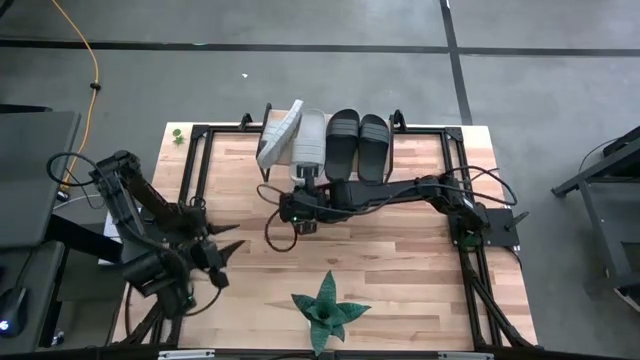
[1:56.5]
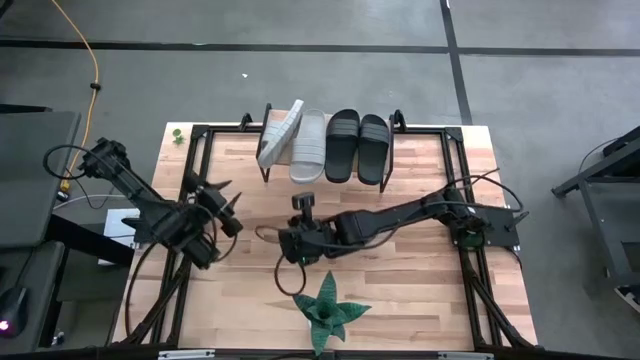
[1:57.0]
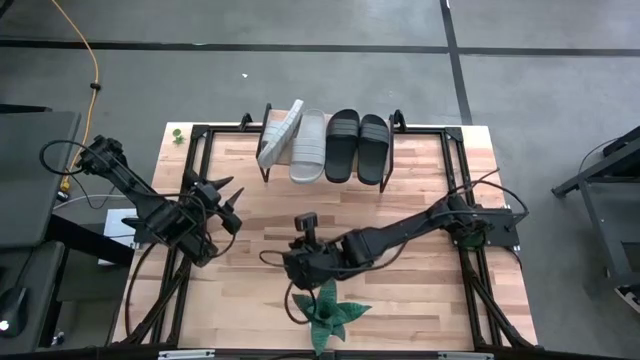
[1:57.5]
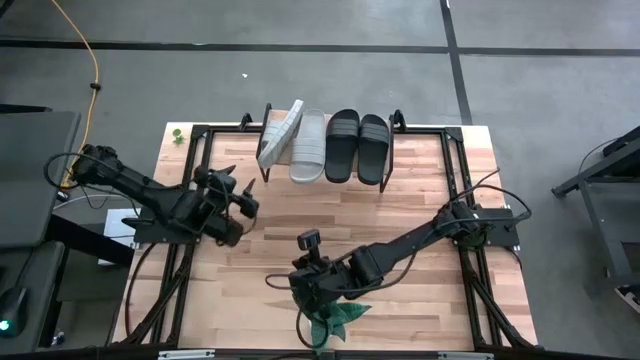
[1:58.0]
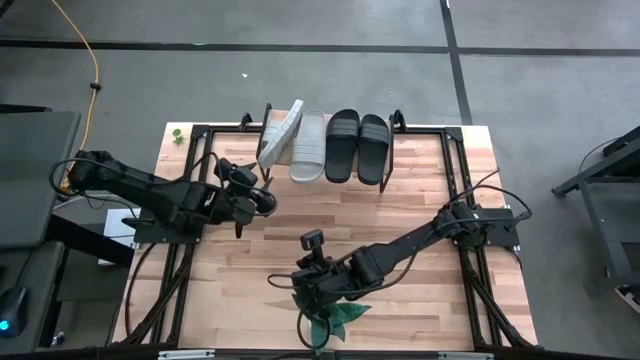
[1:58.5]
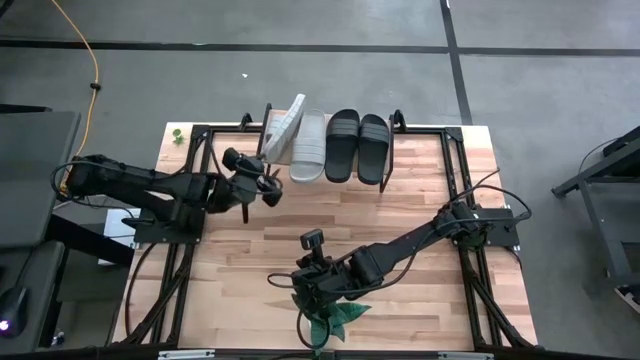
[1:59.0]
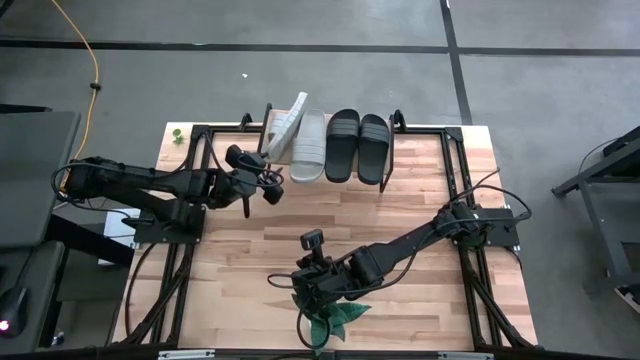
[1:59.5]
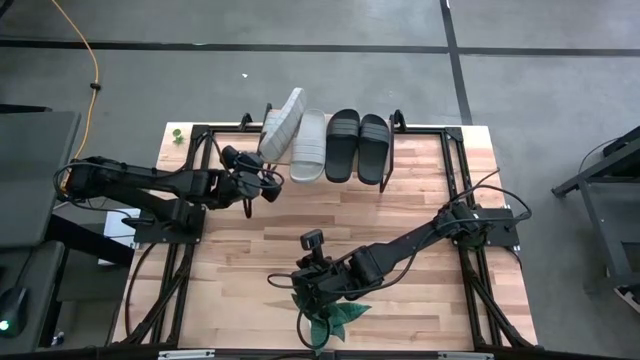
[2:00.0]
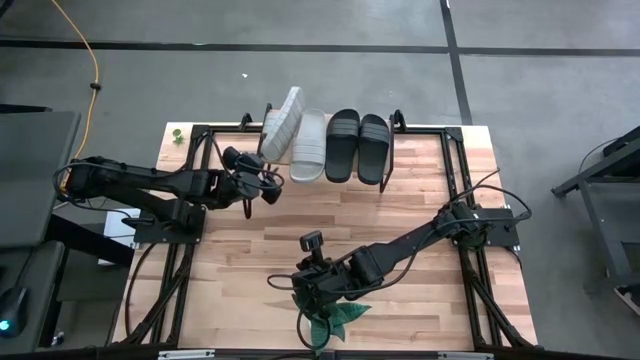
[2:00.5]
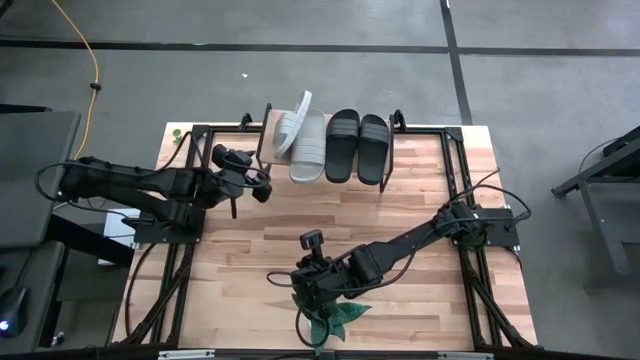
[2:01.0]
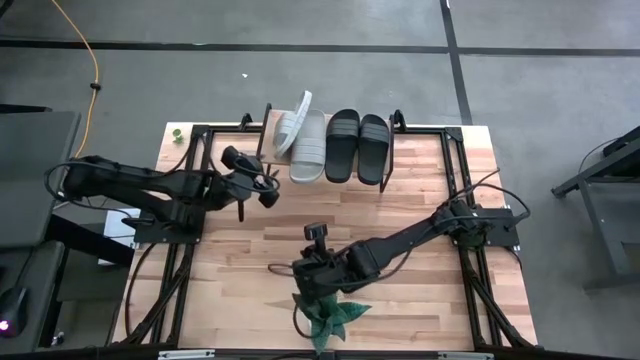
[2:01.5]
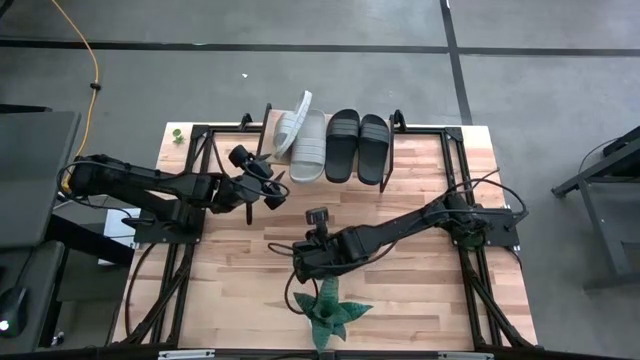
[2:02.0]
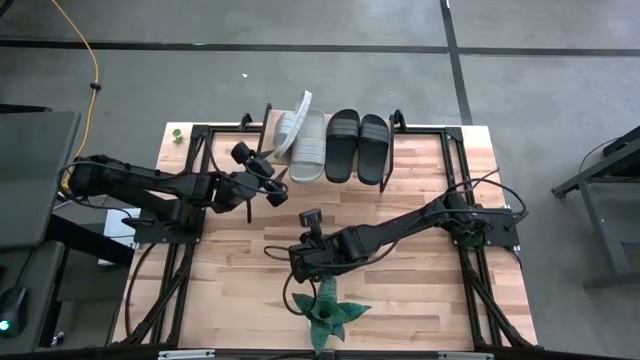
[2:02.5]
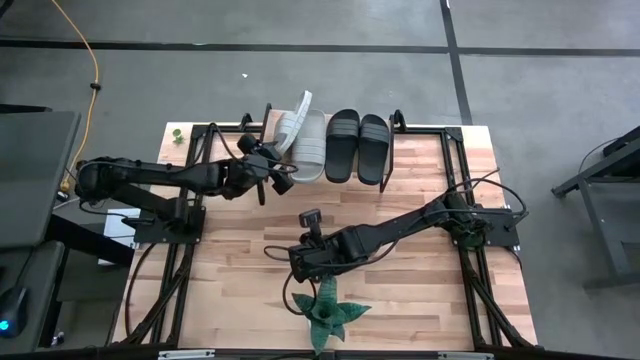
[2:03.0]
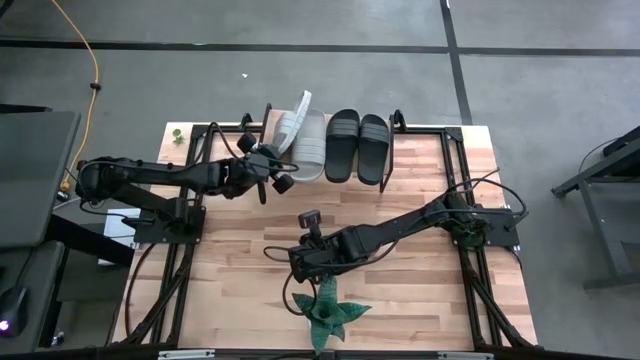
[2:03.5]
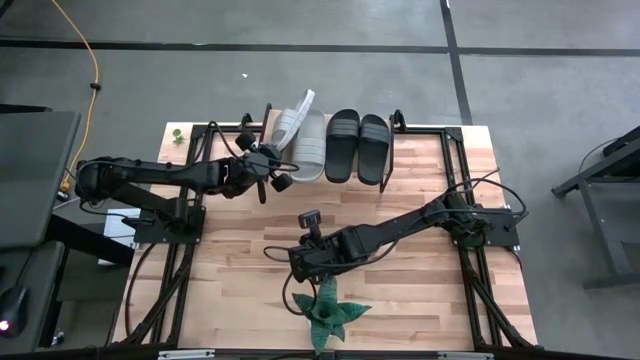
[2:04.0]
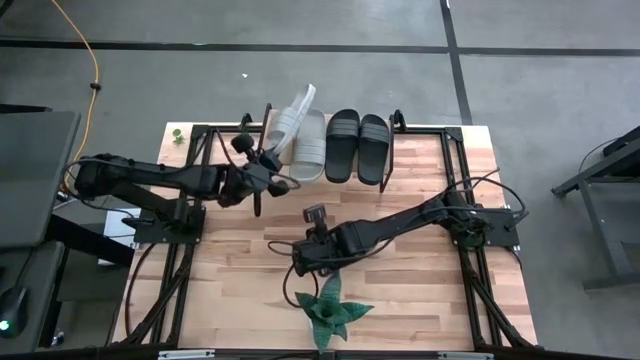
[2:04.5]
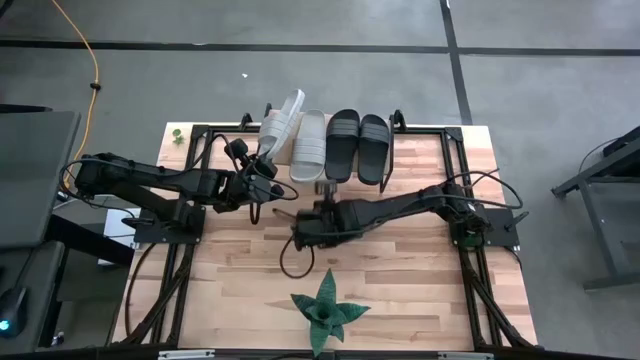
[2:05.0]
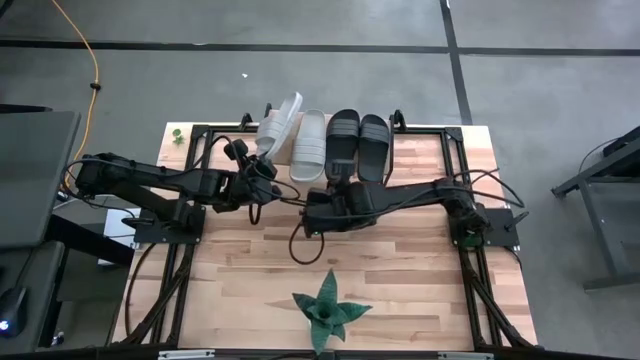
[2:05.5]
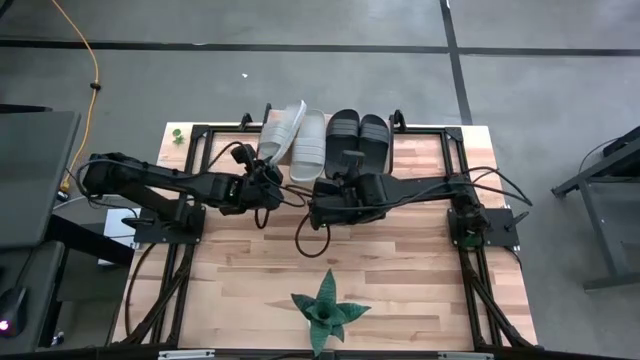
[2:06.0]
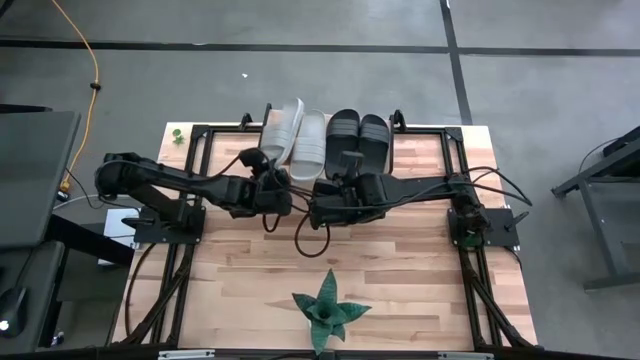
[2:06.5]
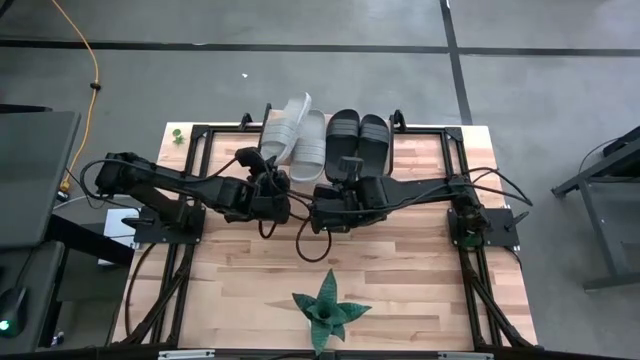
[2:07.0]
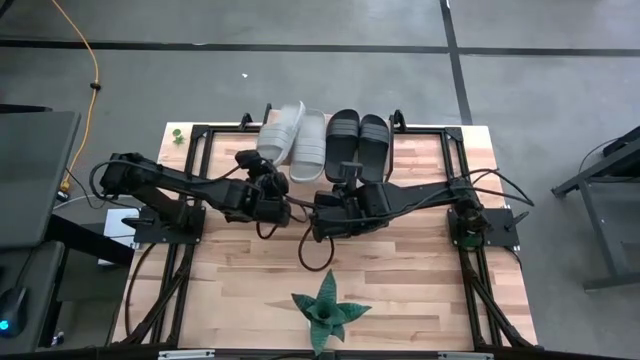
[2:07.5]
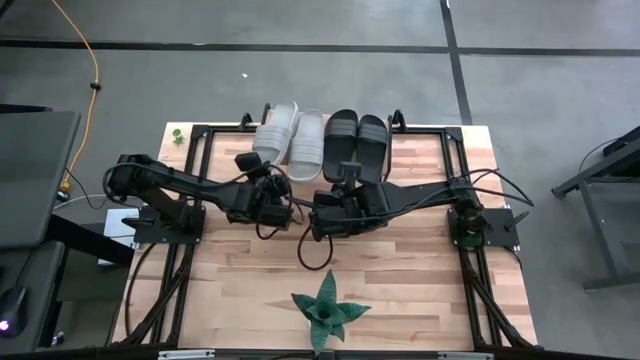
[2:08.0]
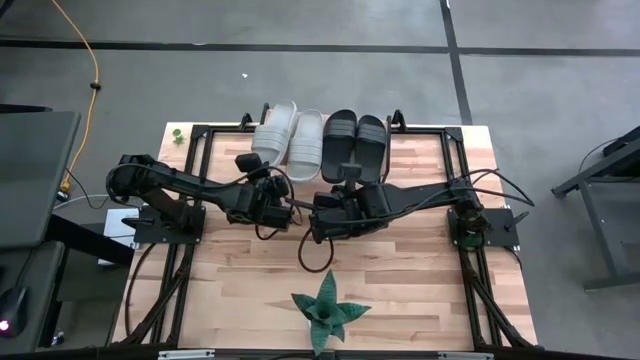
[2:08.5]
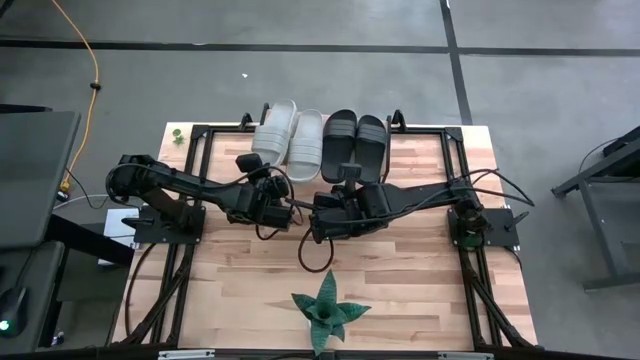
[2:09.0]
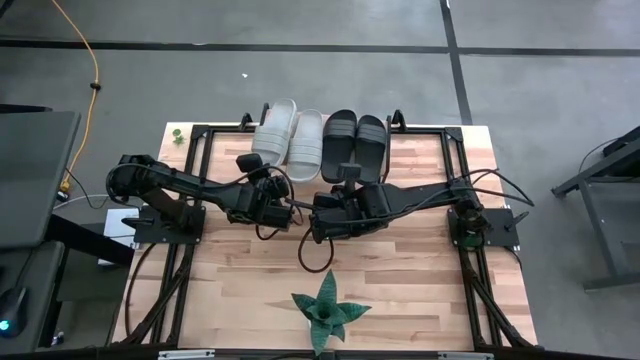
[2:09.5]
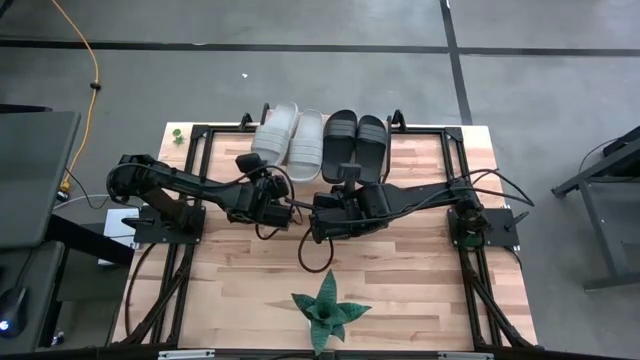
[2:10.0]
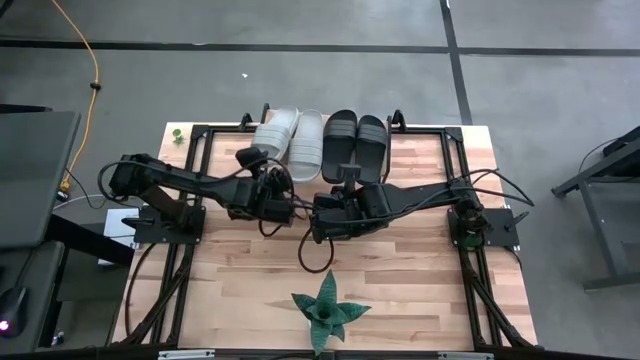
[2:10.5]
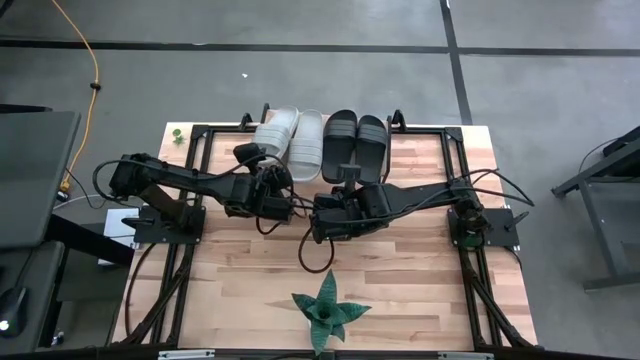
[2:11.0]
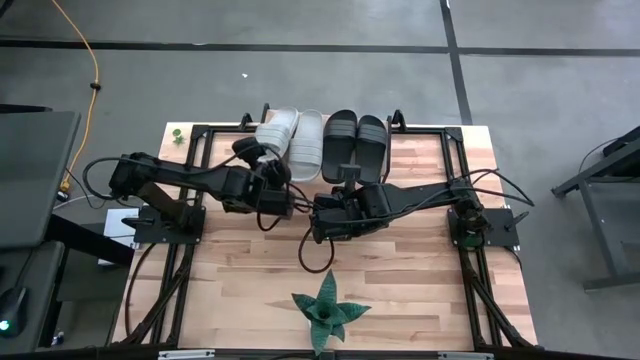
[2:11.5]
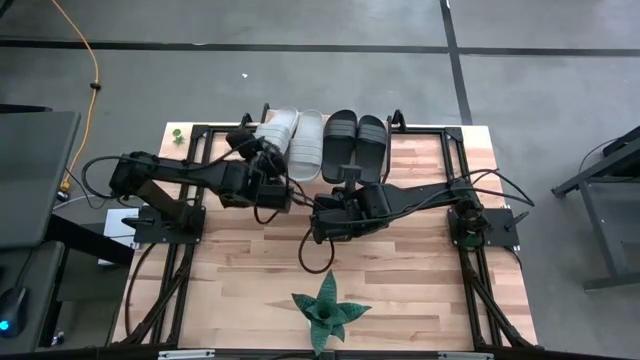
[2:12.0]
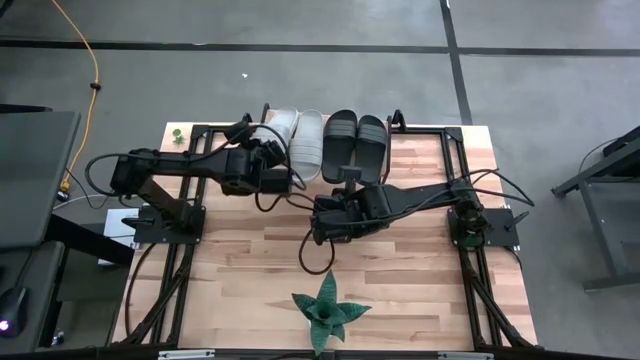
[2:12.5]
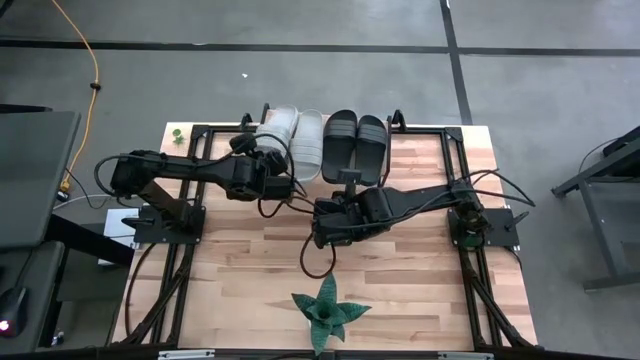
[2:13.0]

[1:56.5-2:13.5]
Task: Pick and place slides into the shelf
Put the gray slipper on the shelf

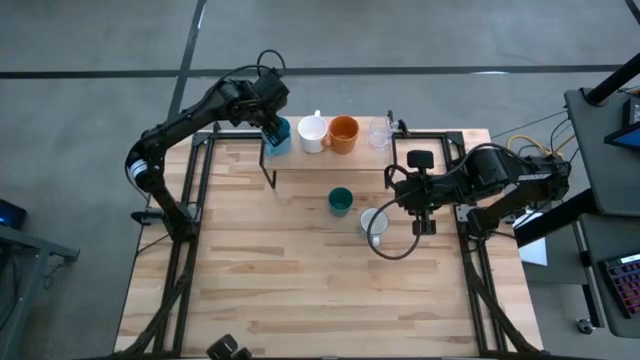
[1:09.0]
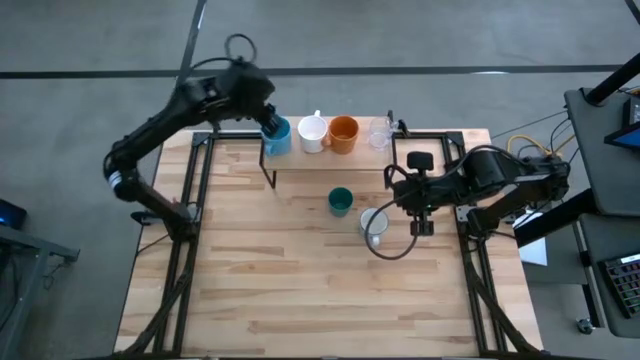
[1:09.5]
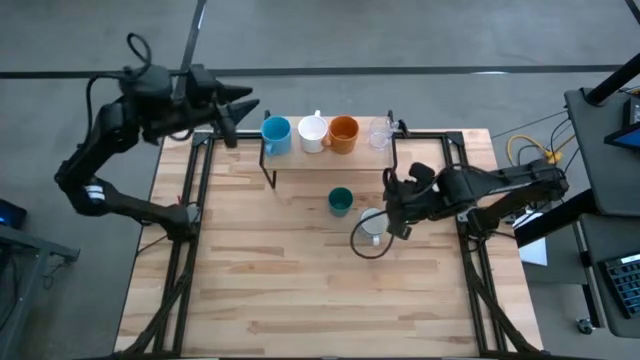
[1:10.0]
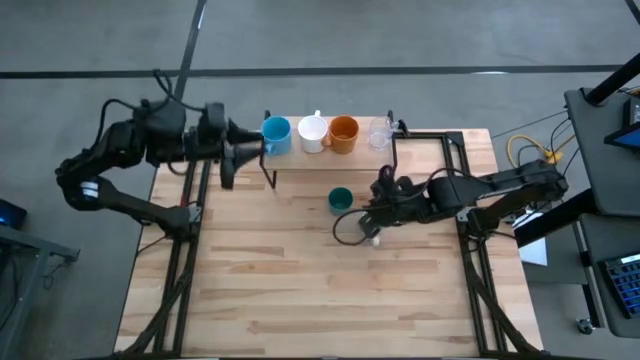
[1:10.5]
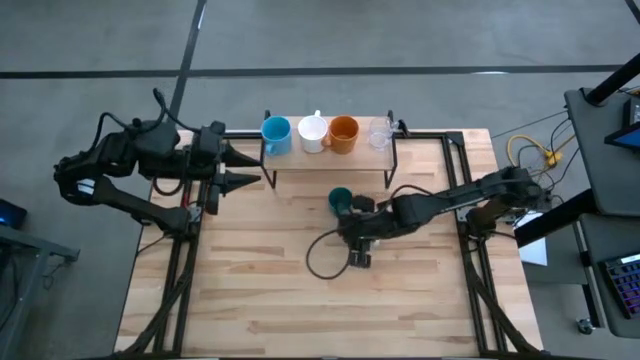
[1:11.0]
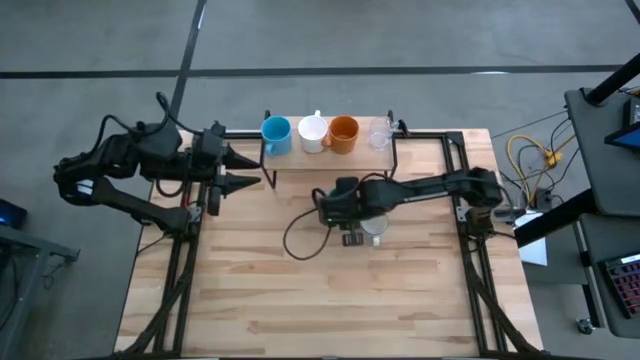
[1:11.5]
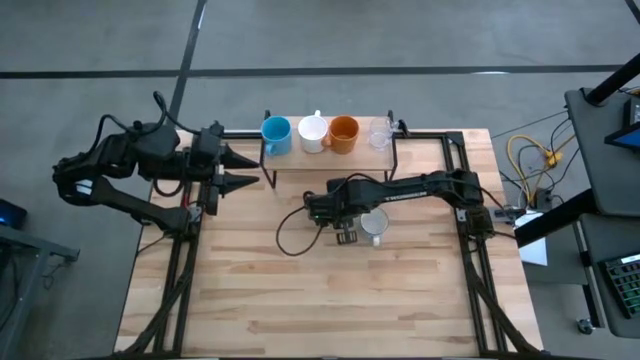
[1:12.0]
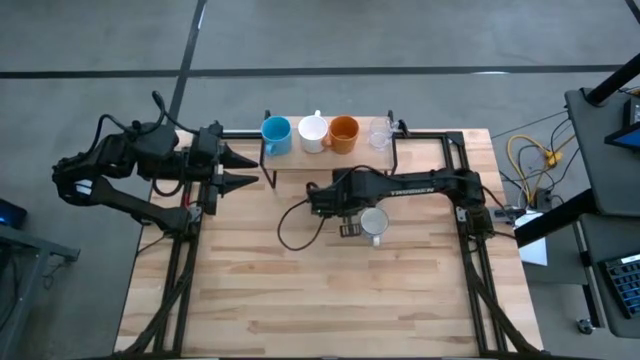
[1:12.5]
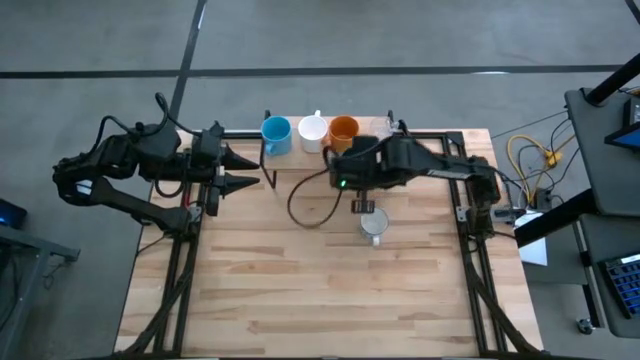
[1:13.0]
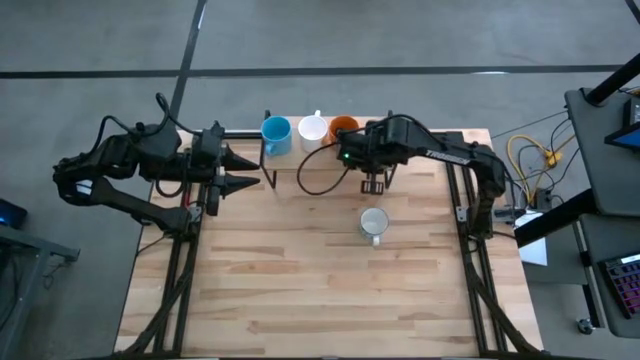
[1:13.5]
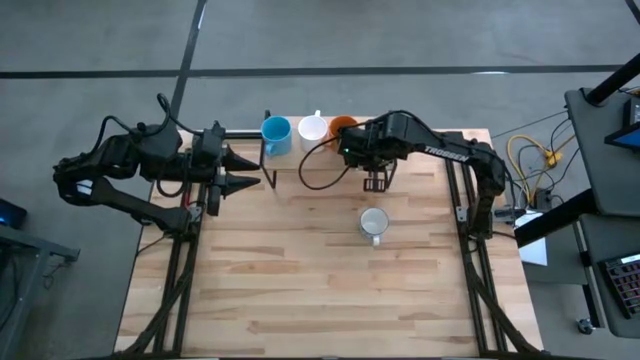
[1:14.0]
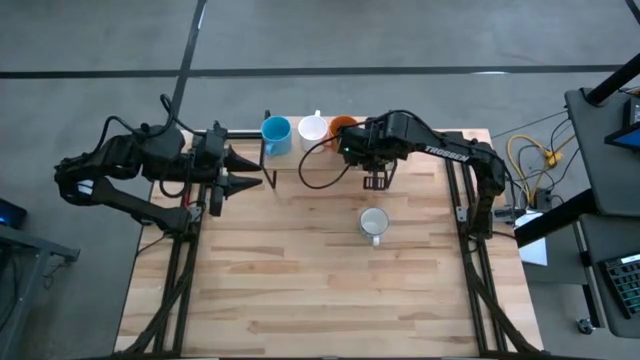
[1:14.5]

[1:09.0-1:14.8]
Task: Stack small to large cups/mugs on shelf
Put the green mug on the shelf
